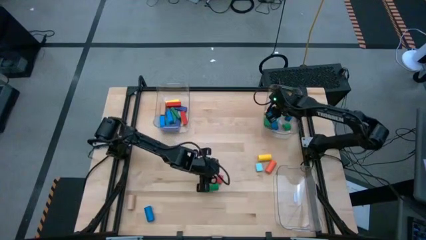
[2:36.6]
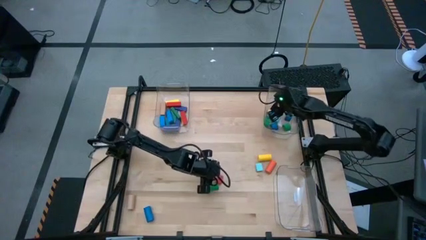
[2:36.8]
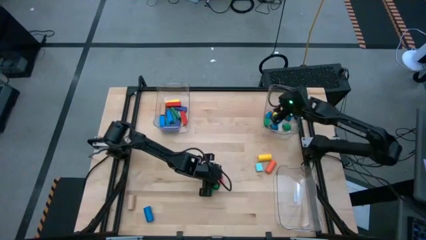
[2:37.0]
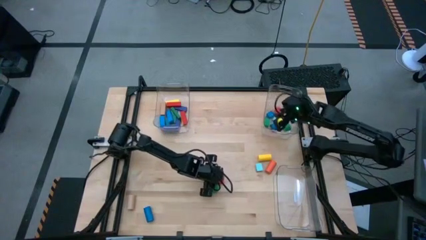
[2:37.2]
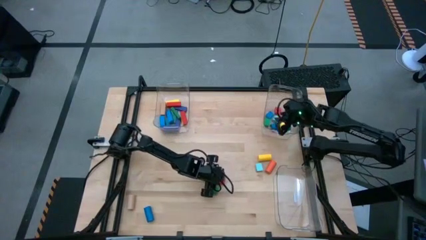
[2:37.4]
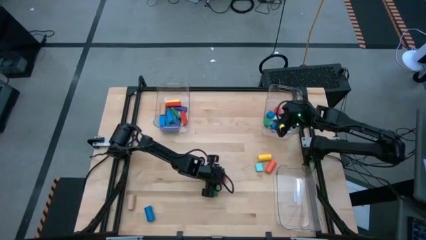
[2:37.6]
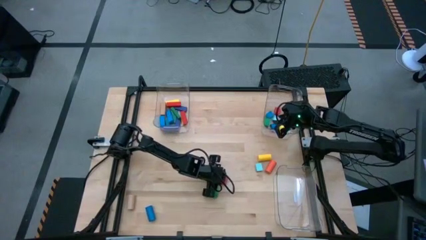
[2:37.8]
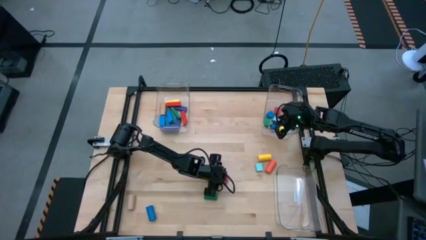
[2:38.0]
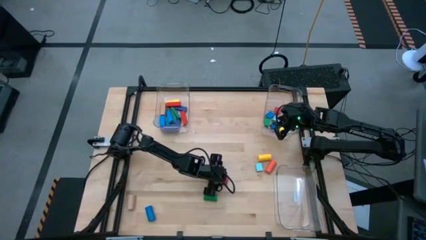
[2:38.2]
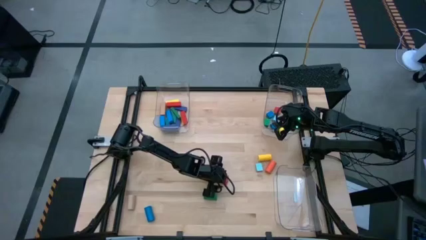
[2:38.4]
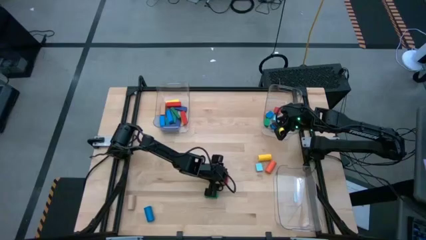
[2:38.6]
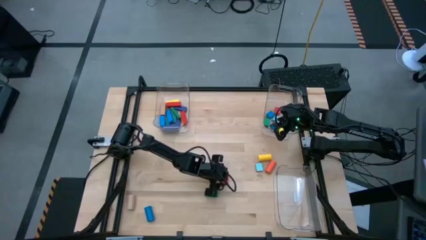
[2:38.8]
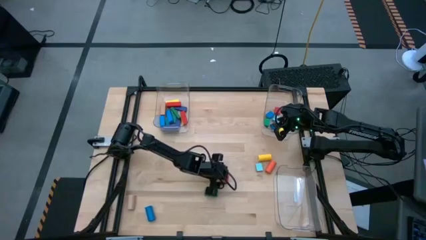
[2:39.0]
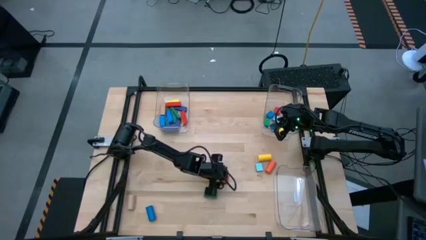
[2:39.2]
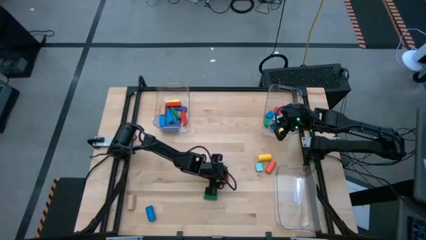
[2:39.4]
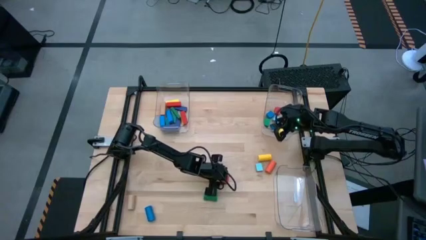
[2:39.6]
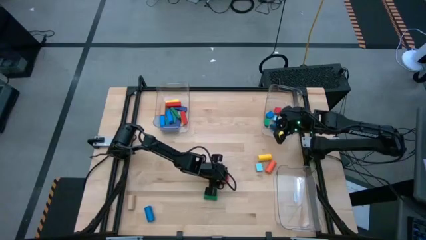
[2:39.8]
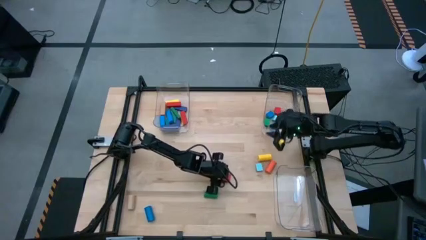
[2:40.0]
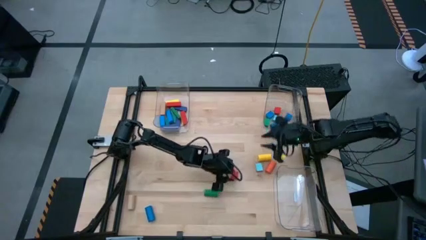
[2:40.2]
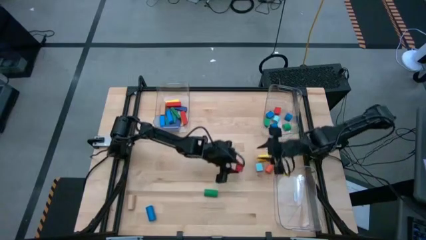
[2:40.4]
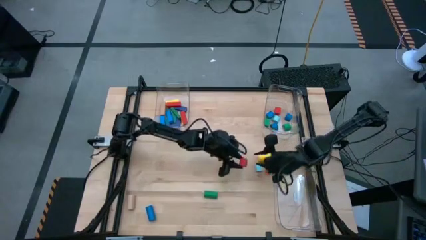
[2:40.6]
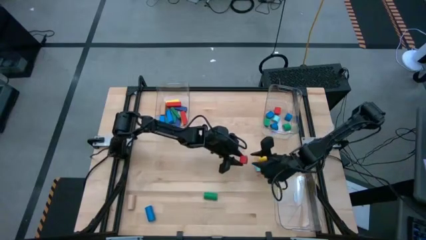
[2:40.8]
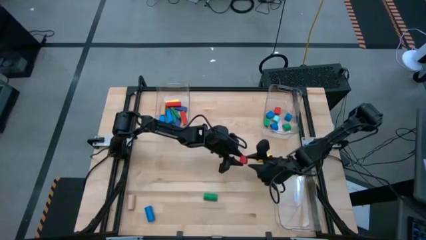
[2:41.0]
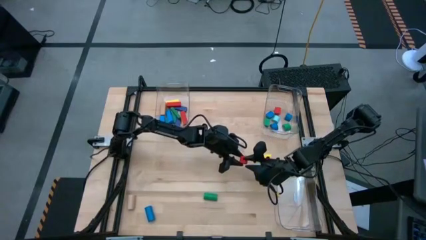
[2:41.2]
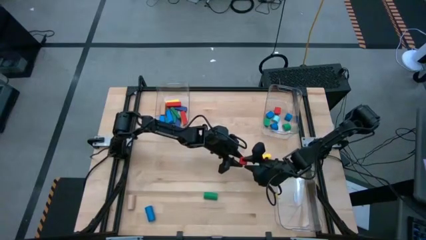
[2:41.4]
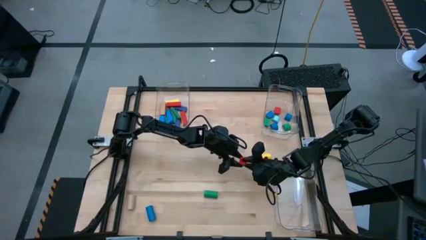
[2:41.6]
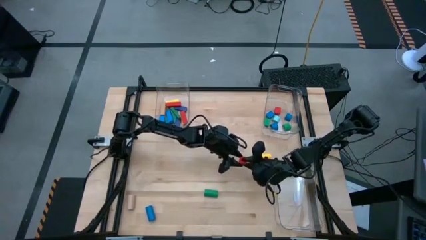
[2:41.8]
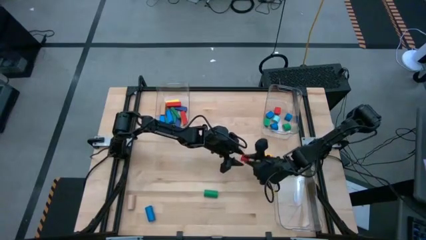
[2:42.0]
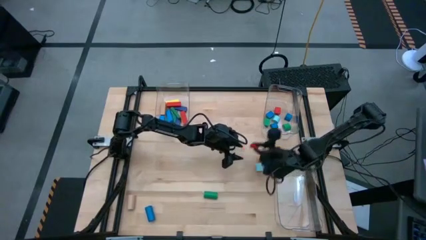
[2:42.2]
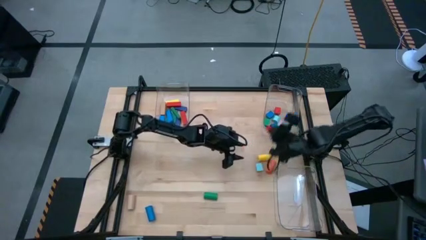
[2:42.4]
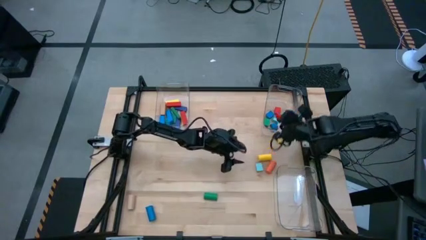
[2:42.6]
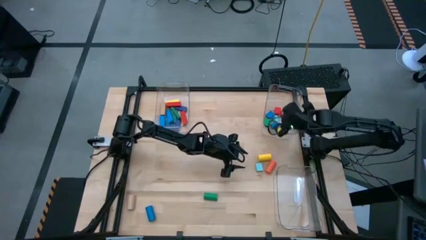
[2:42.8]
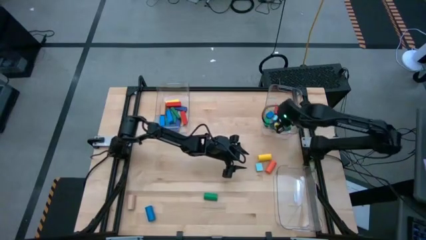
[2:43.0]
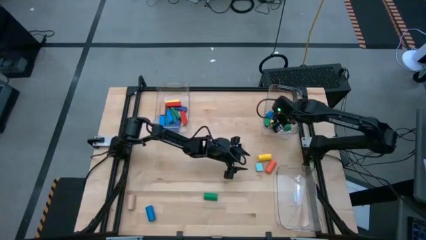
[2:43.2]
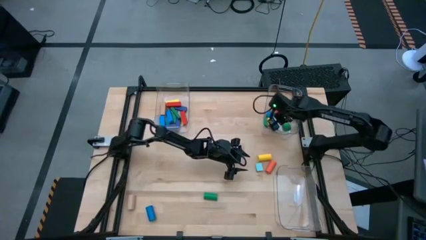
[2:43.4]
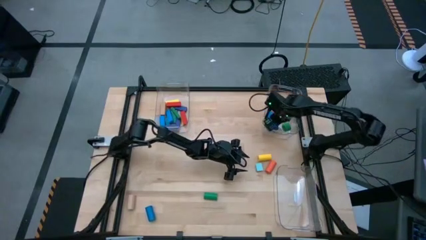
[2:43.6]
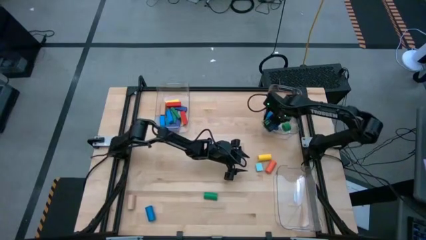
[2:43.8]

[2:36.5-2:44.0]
Task: Sort blocks by size
Put the red half-circle block into the top right transparent bin

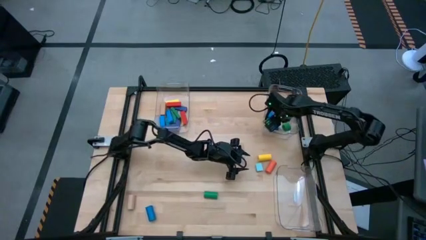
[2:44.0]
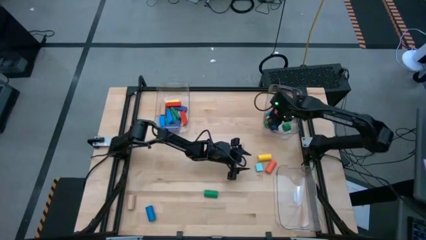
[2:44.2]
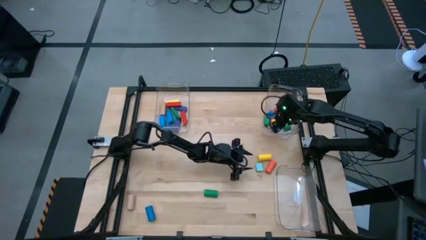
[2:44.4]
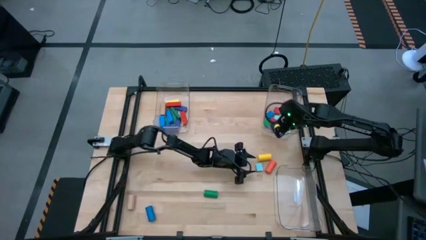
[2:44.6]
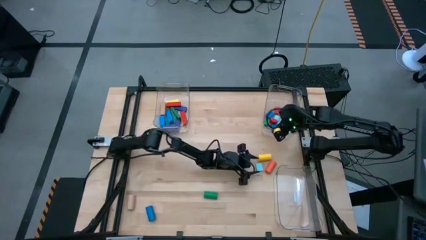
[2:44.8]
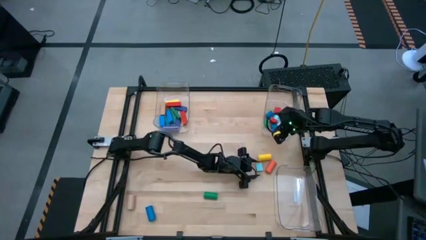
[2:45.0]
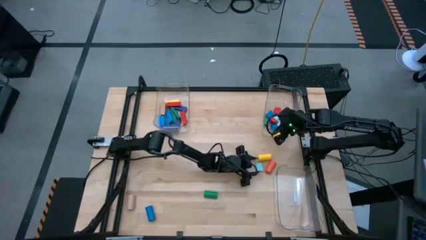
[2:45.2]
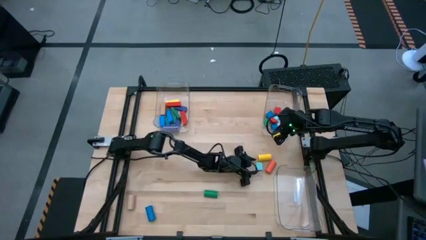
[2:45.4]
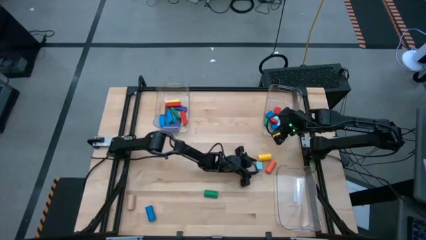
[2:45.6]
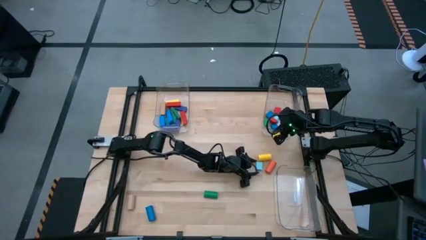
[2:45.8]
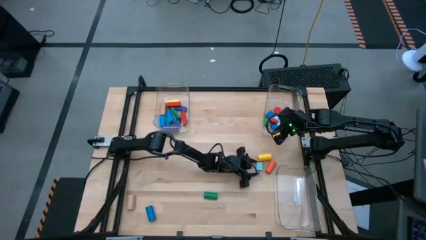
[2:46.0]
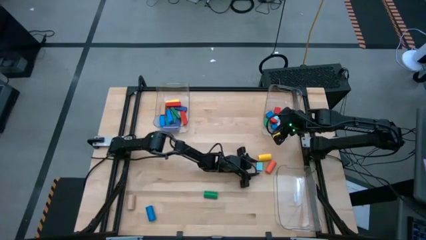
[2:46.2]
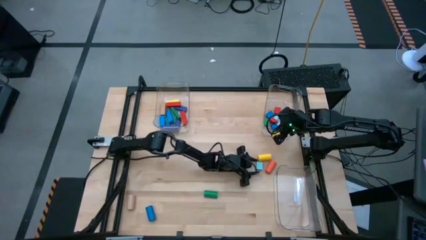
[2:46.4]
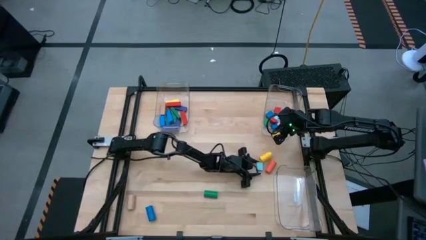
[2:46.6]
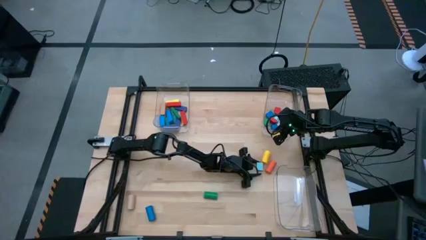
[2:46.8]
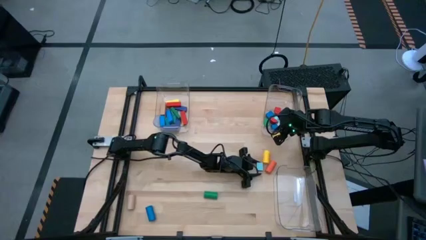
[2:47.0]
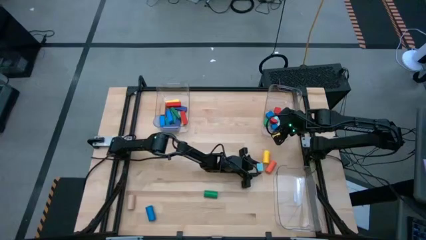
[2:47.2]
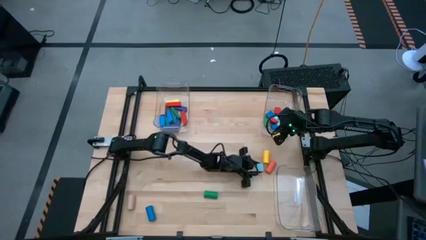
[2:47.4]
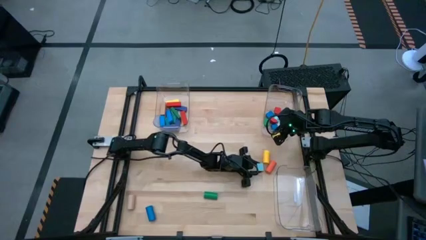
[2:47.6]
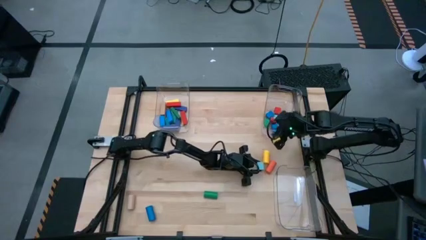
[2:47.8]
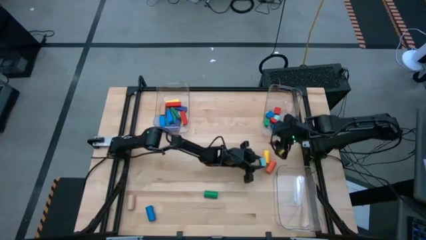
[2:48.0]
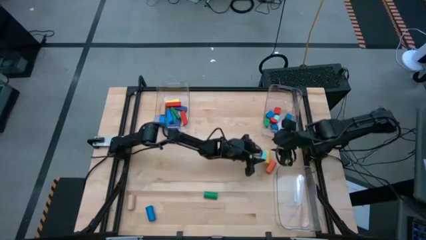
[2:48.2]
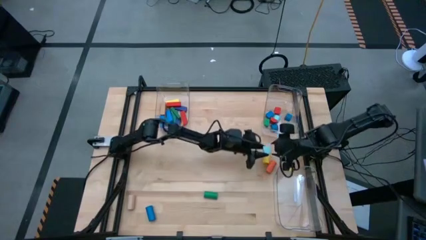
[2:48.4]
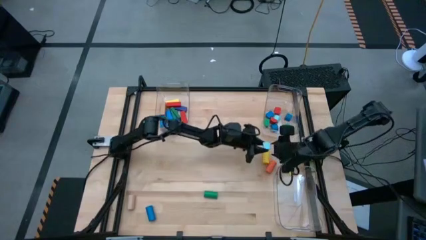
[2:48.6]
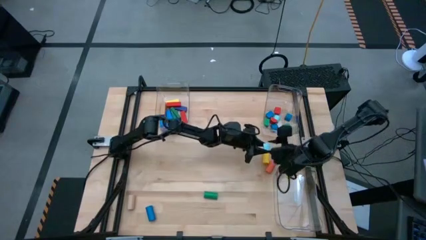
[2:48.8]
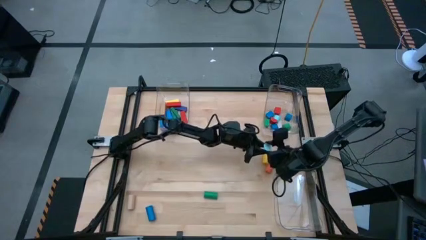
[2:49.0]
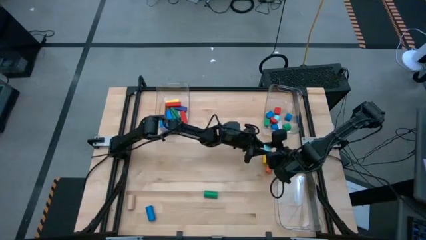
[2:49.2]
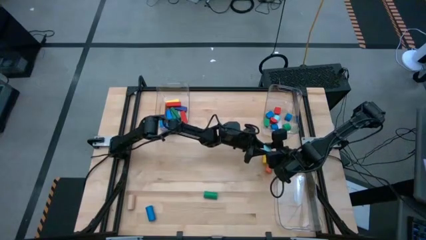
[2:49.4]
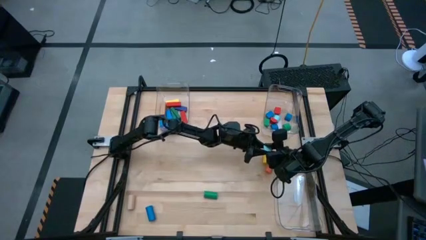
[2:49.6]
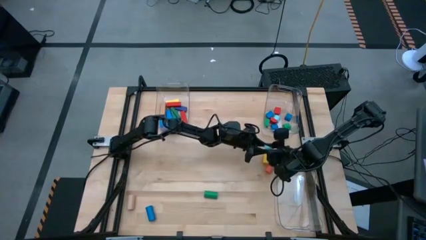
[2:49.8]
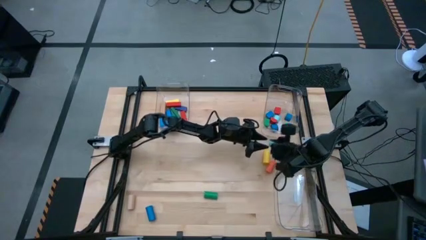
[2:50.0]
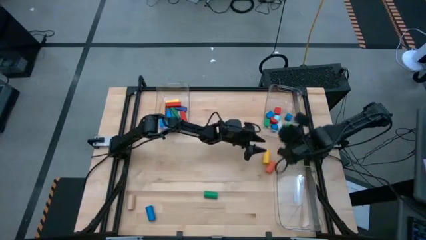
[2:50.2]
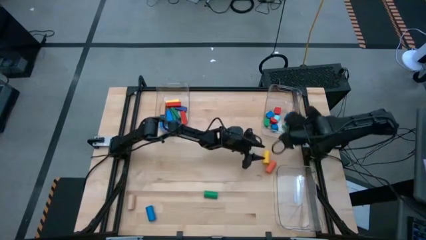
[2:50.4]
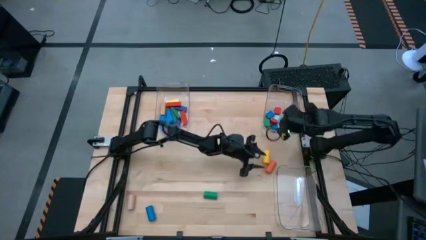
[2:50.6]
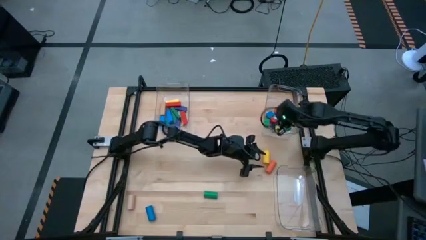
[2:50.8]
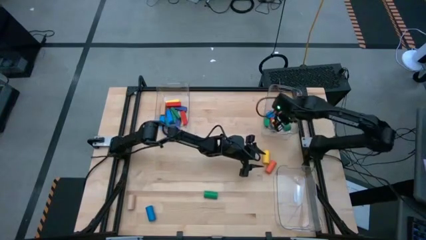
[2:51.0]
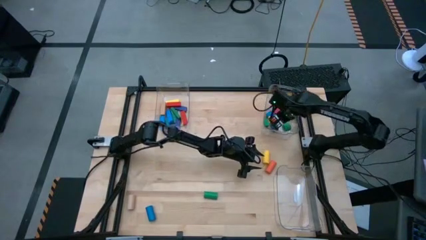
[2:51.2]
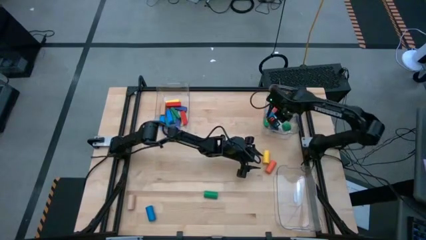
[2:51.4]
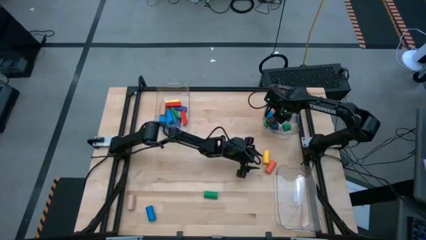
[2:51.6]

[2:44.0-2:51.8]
Put the light blue half-circle block into the top right transparent bin

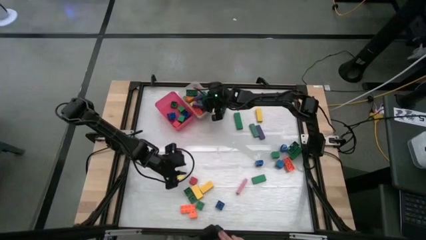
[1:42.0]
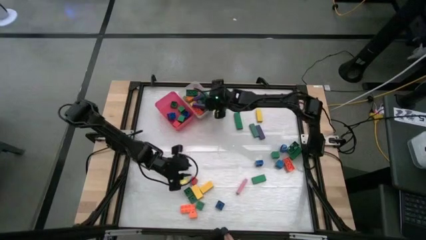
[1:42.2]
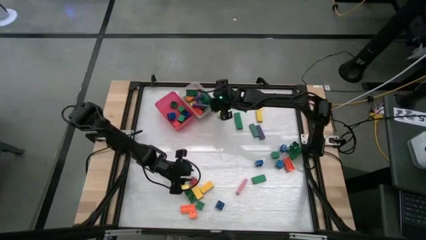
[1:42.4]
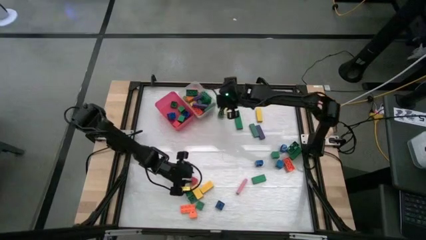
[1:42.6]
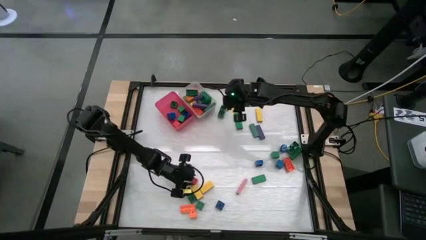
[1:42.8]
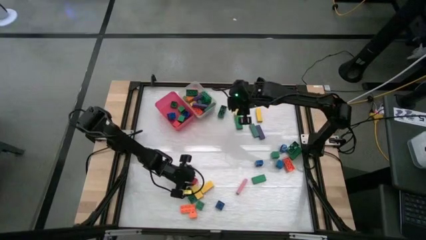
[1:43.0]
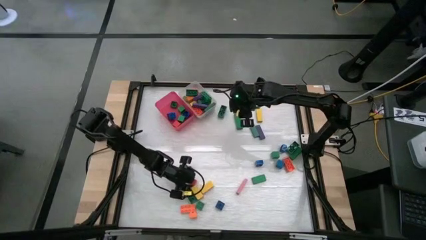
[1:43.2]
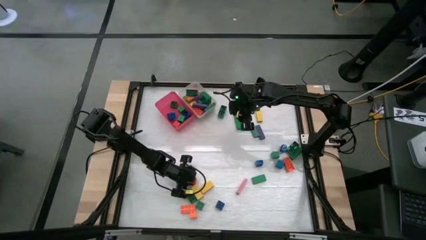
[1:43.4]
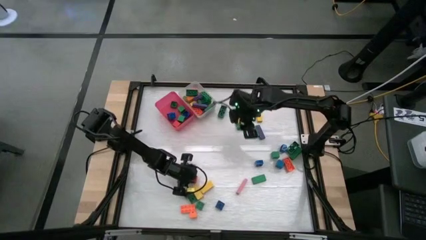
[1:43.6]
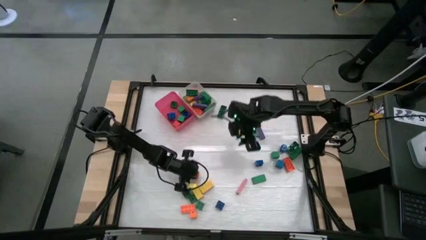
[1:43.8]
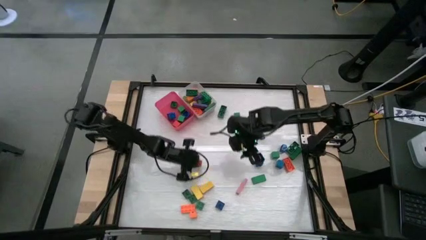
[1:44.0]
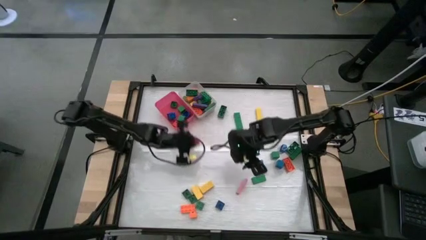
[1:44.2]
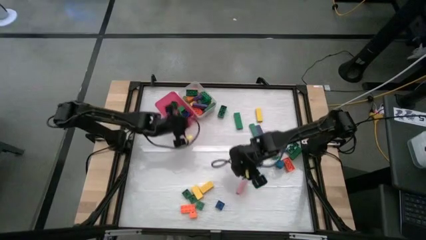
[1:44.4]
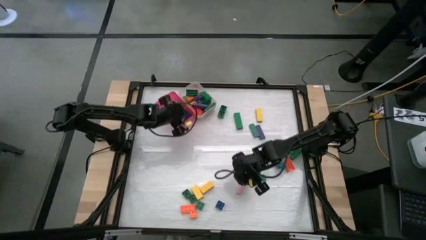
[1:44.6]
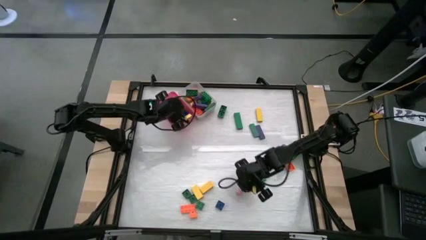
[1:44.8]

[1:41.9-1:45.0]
Task: Sort blocks by size
Put the small red block into the pink bin

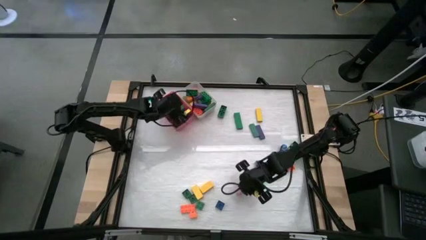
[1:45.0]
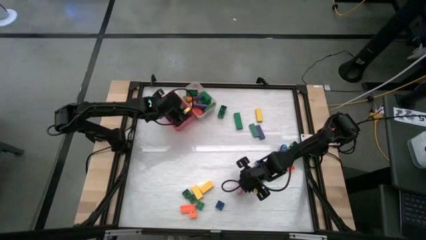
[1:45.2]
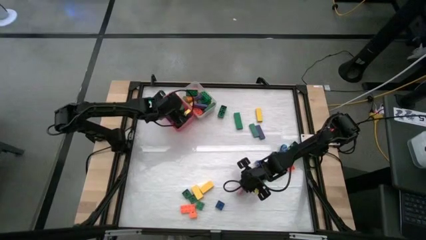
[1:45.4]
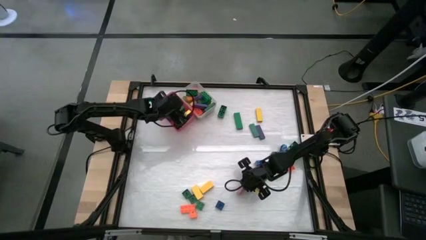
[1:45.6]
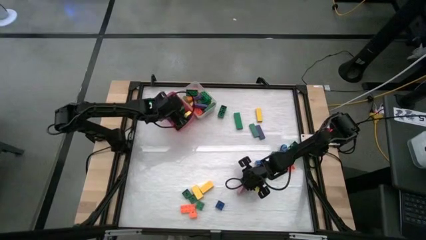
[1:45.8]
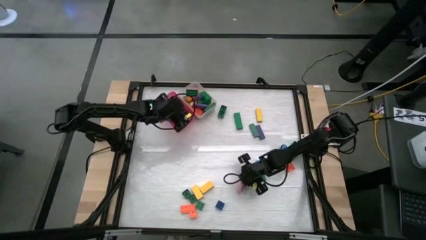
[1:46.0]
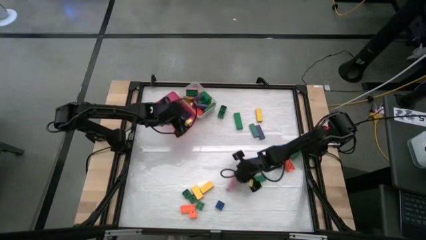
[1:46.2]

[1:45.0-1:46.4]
Put the big pink block into the white bin
